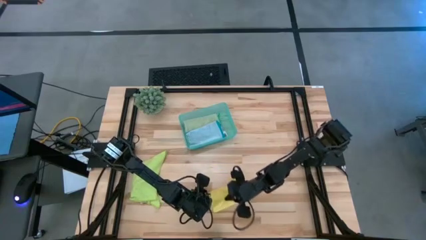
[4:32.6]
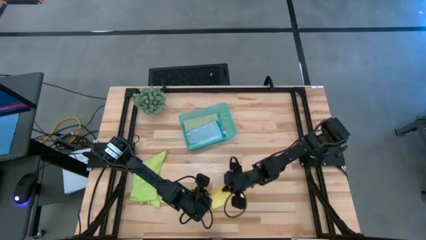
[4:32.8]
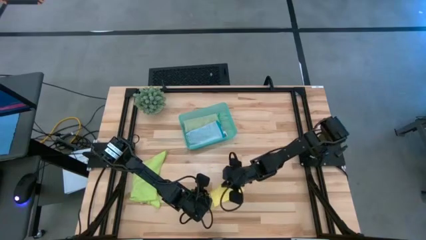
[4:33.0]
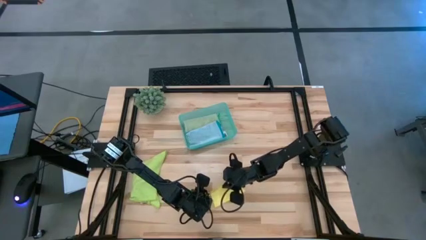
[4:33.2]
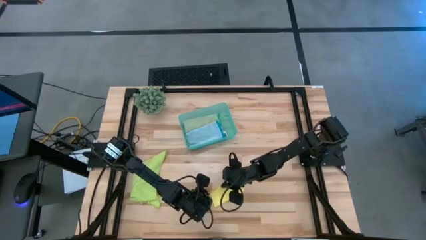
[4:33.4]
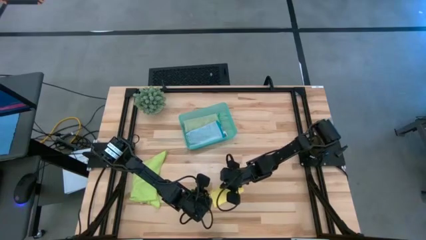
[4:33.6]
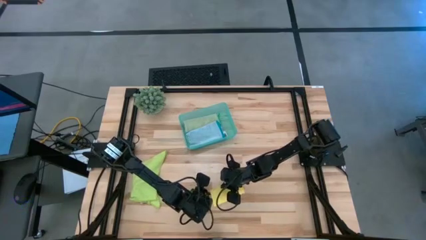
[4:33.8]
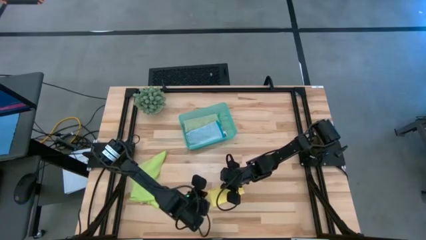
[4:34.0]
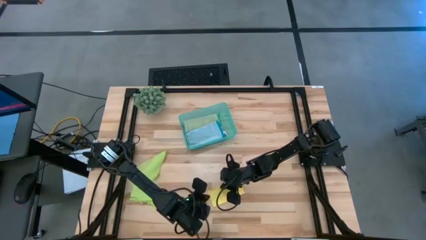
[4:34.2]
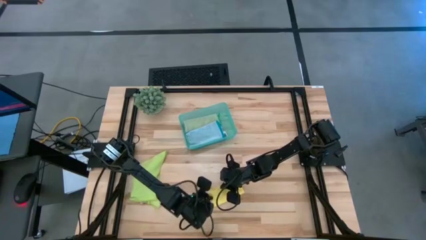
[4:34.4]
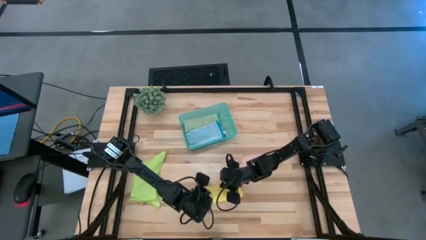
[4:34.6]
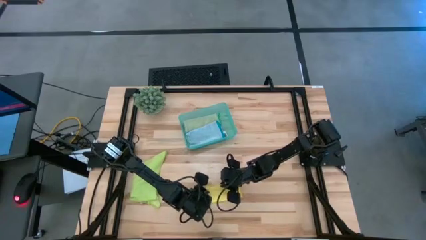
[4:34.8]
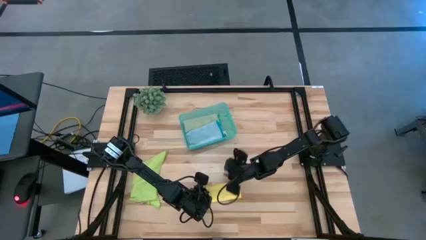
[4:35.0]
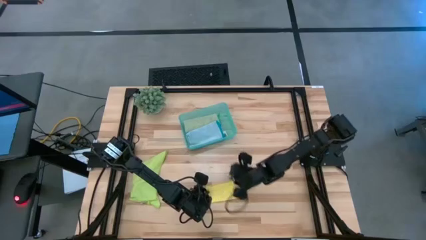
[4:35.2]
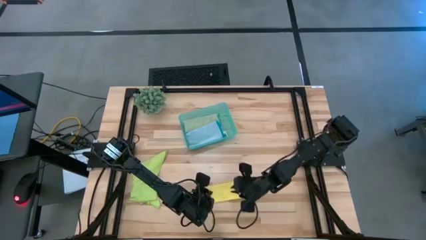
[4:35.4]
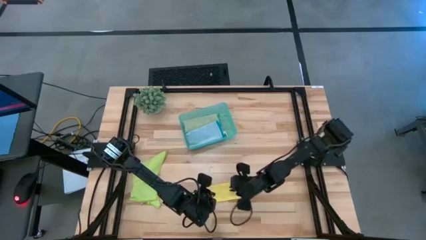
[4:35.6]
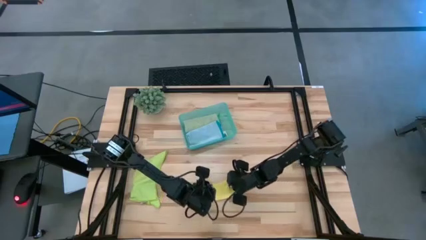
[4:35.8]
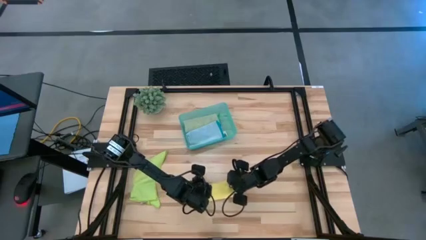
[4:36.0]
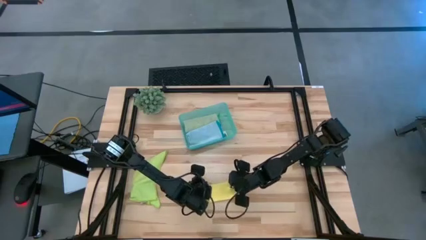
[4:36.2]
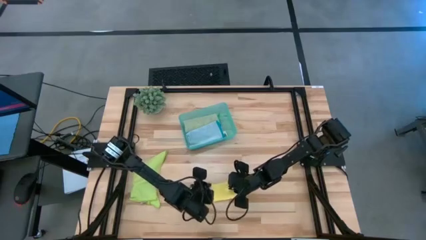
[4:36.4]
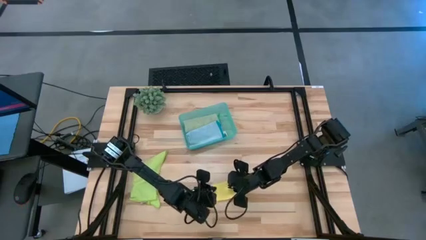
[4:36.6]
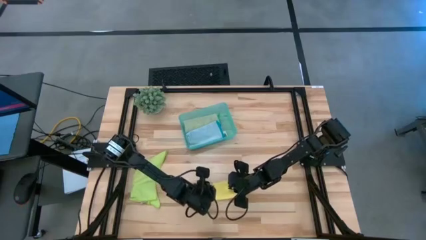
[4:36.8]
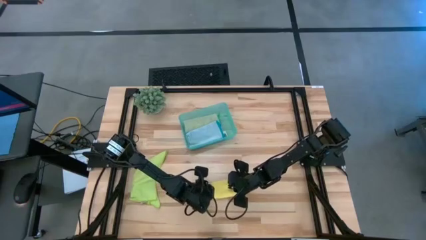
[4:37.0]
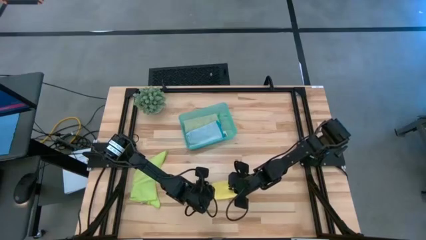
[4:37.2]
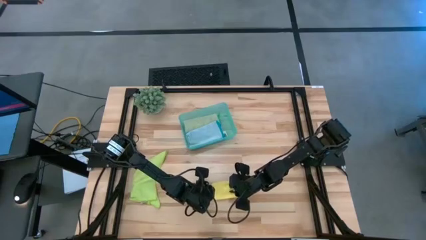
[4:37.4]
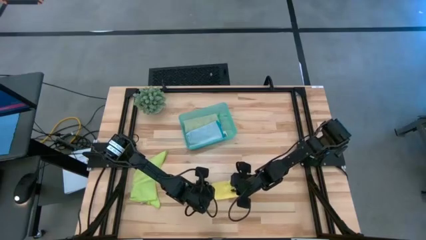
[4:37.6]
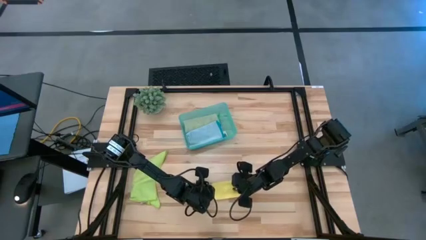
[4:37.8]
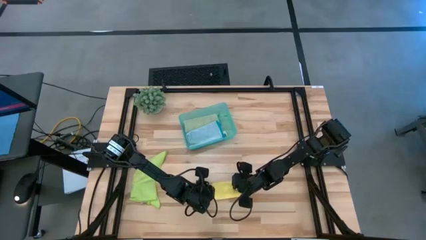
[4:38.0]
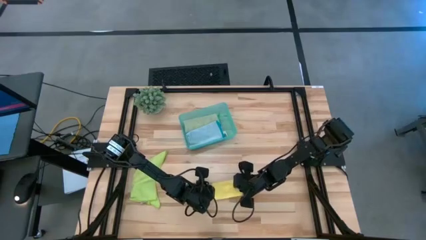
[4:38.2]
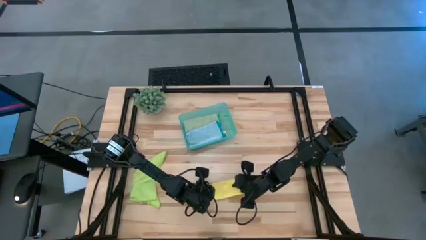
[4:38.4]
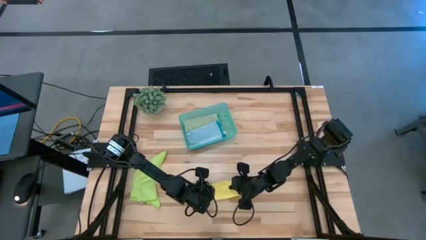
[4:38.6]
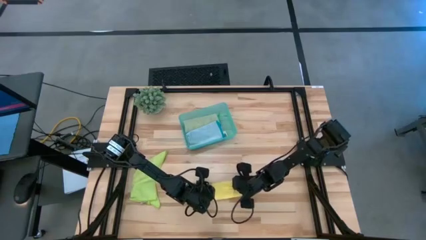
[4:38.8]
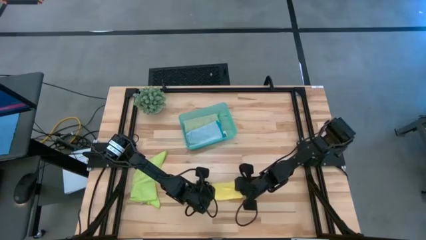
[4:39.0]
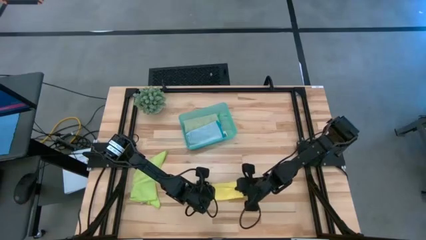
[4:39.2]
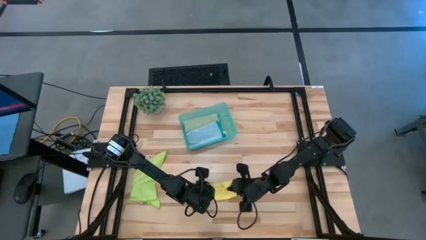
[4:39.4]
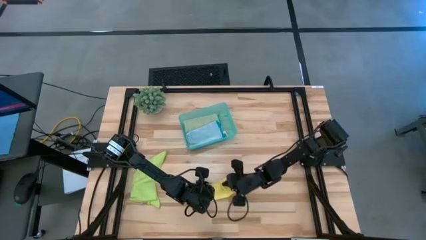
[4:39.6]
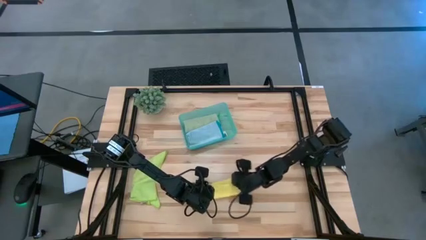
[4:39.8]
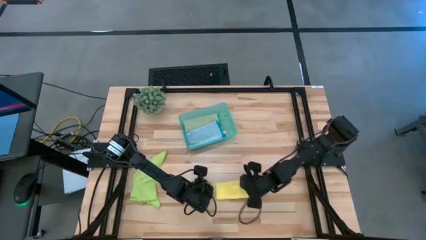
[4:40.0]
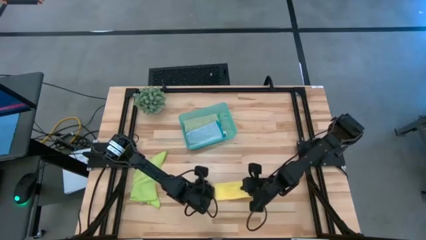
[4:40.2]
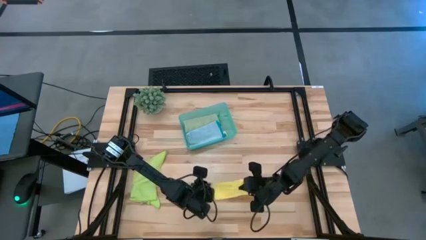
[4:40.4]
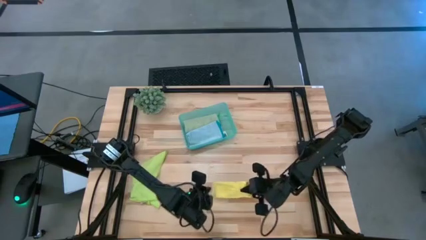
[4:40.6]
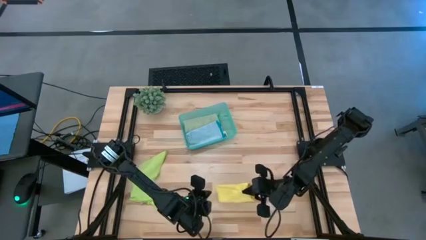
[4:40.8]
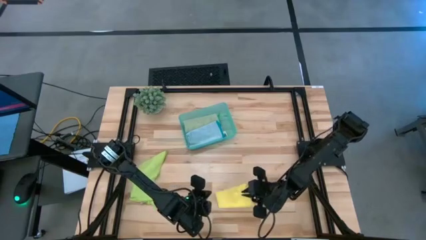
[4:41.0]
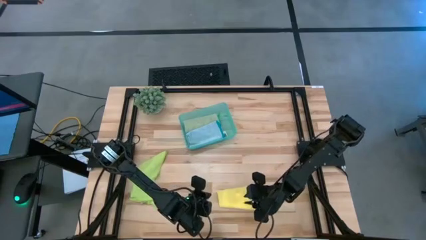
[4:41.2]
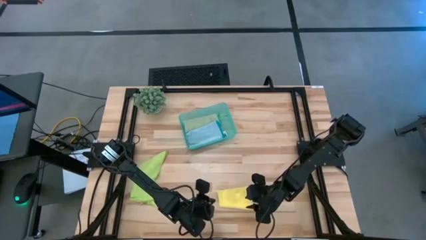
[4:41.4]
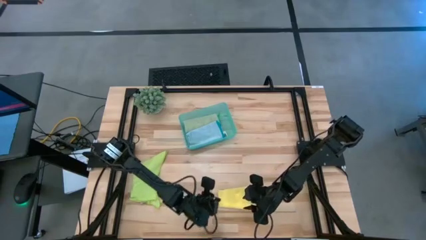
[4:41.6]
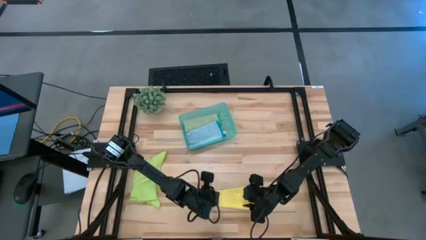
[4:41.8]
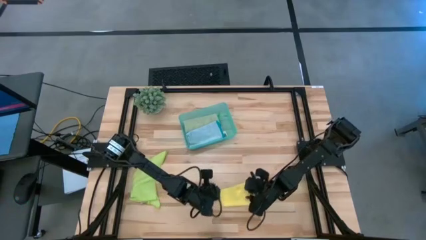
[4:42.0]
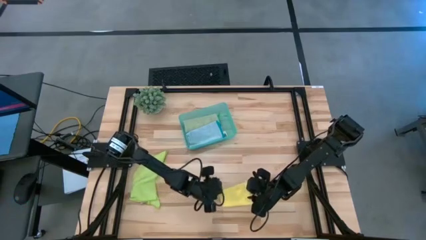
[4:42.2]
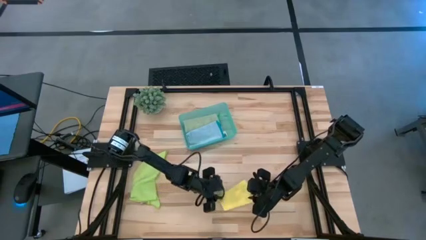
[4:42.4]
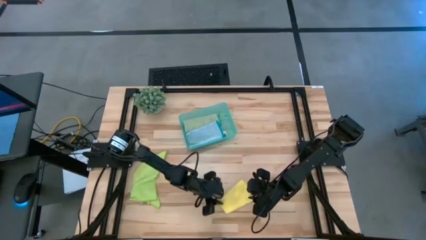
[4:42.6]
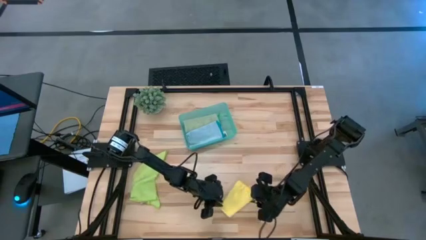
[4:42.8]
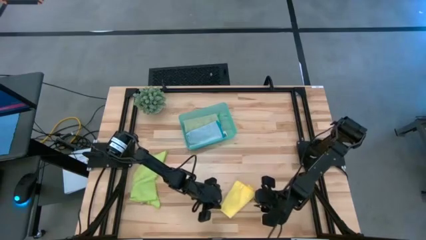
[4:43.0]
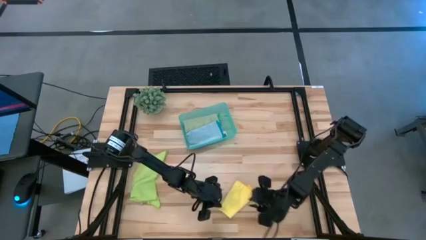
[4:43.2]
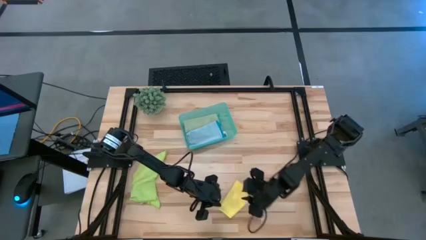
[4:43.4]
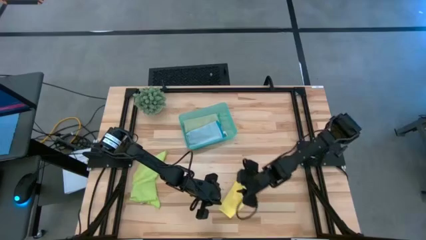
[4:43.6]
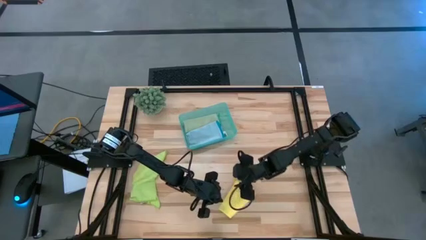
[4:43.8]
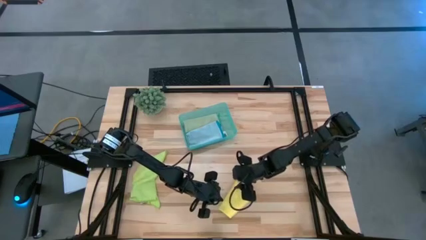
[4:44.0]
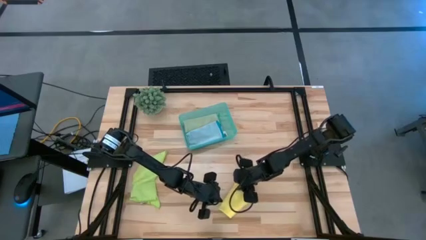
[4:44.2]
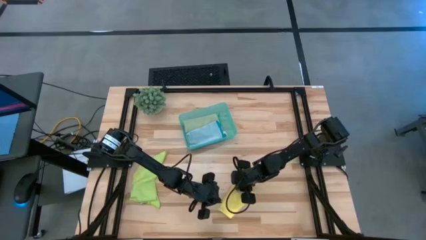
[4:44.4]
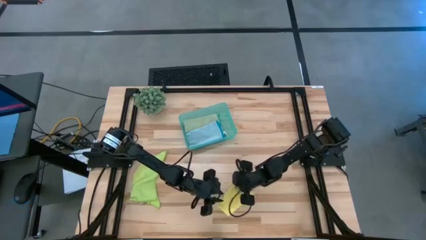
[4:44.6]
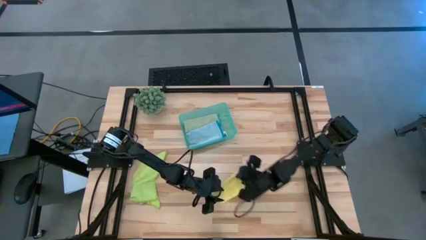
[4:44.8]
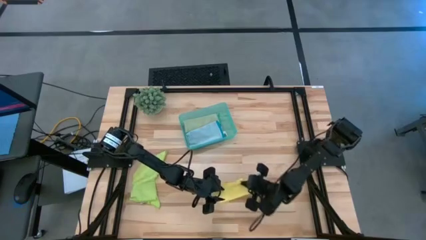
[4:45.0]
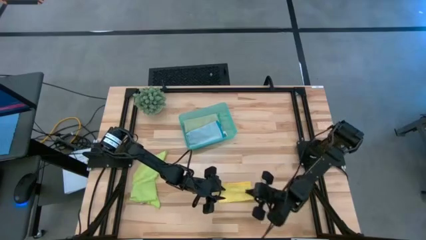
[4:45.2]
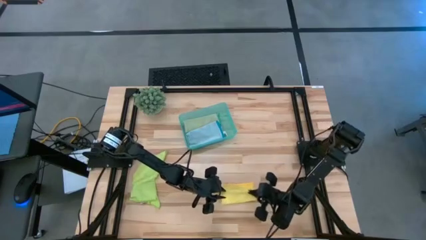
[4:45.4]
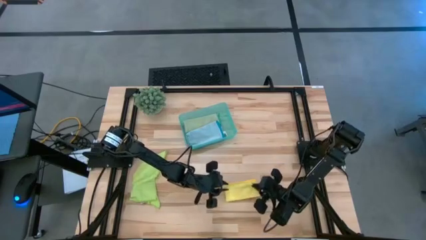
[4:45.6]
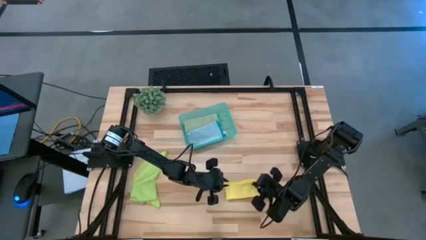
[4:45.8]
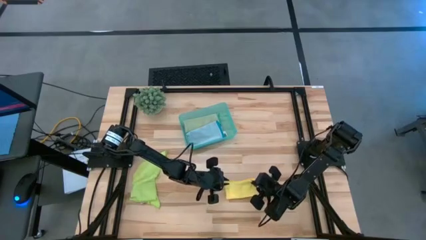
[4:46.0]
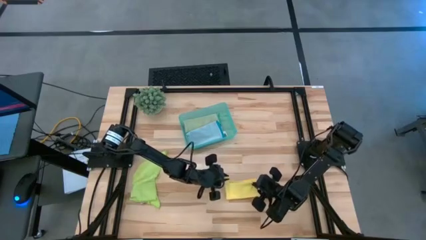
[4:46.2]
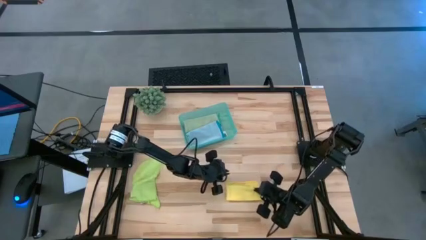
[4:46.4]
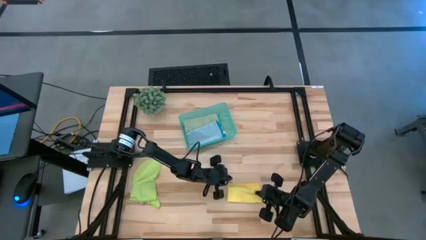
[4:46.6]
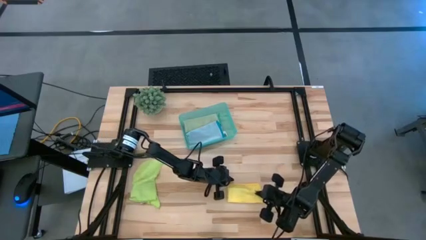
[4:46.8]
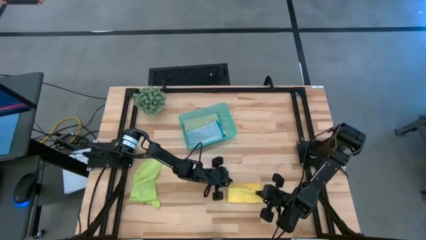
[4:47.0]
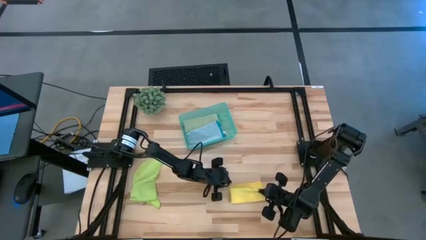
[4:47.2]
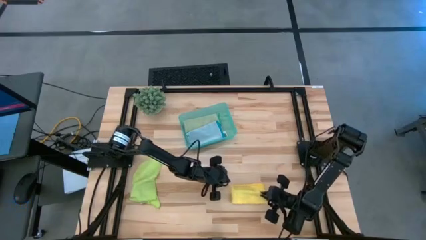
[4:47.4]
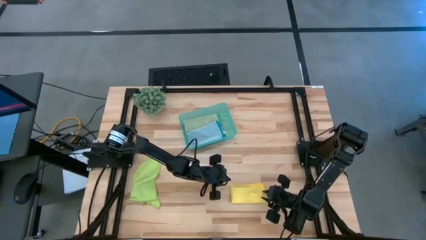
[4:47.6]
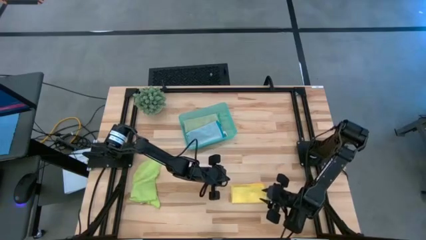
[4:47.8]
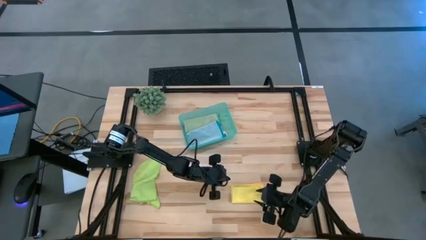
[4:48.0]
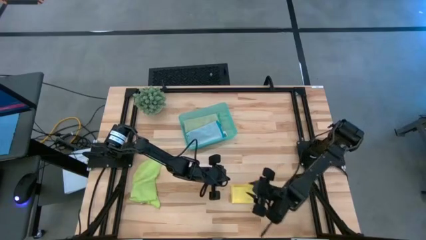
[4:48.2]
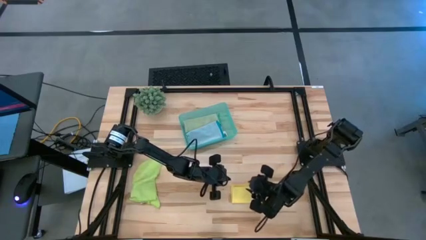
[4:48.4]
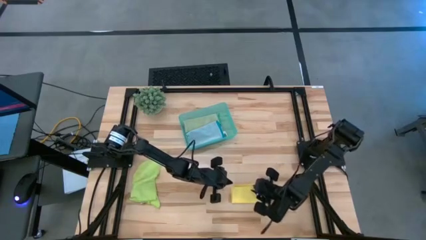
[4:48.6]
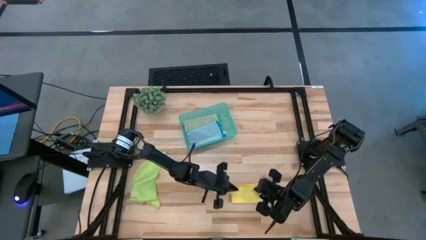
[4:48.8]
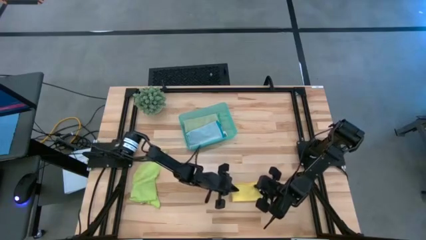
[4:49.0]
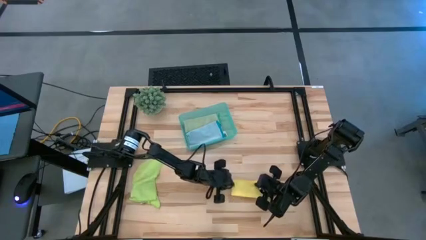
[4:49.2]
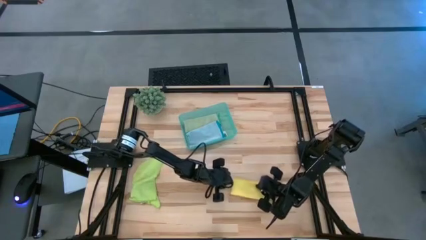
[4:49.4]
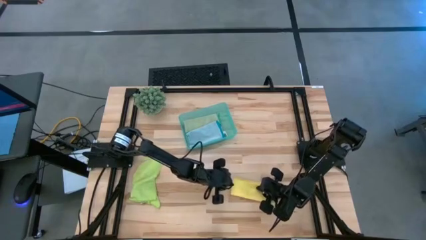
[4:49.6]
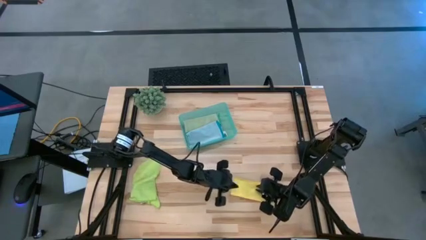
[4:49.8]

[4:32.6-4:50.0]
Task: Fold microfiber towels
Fold the yellow towel
